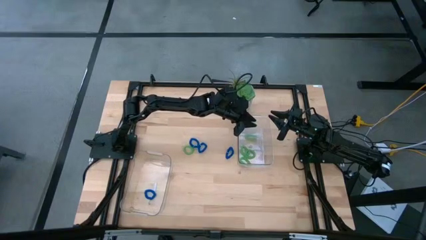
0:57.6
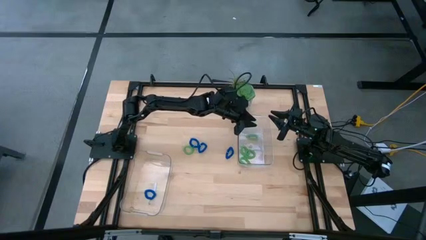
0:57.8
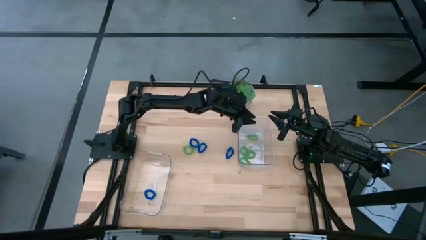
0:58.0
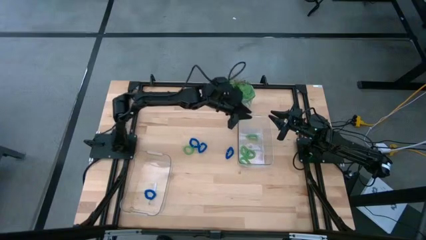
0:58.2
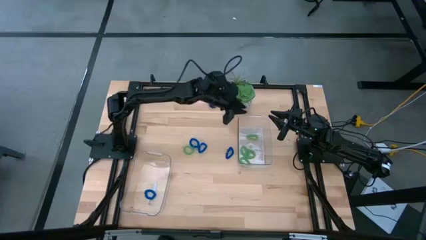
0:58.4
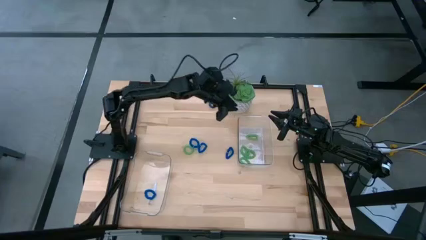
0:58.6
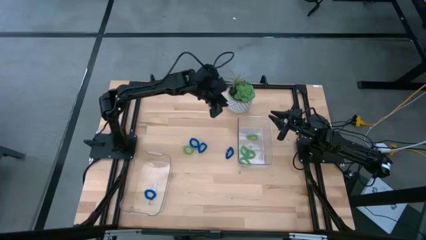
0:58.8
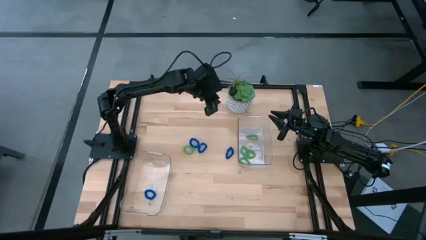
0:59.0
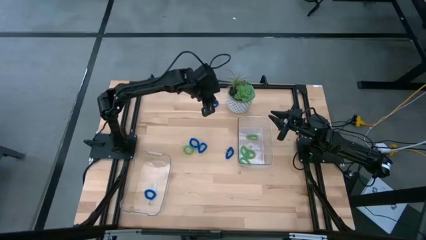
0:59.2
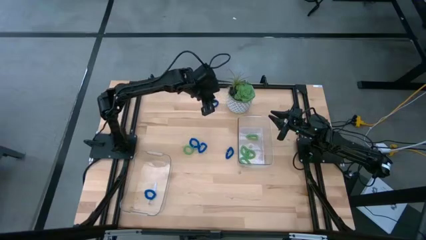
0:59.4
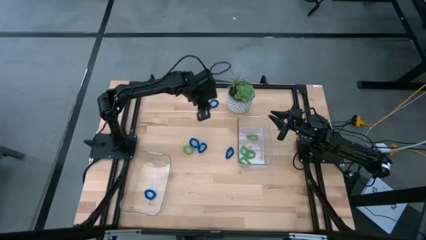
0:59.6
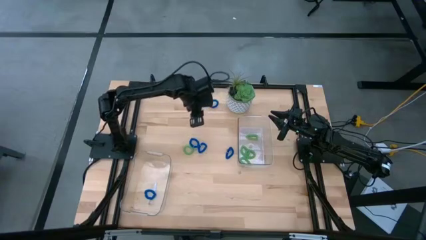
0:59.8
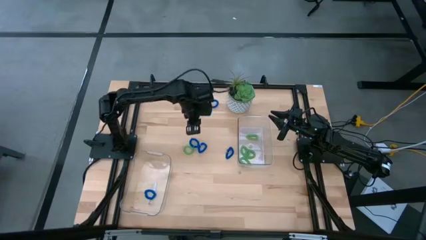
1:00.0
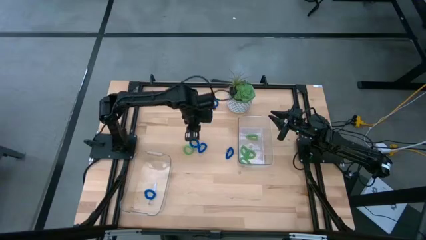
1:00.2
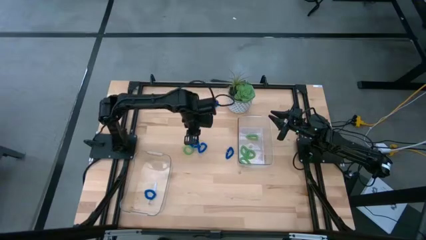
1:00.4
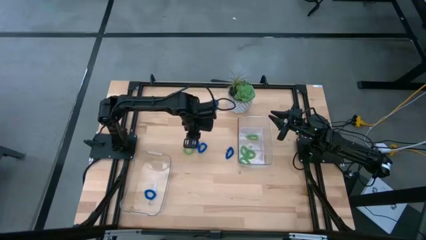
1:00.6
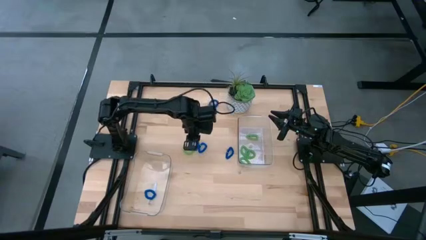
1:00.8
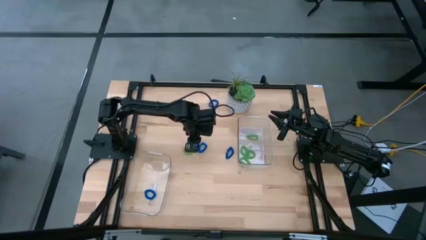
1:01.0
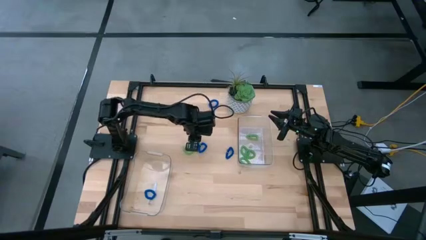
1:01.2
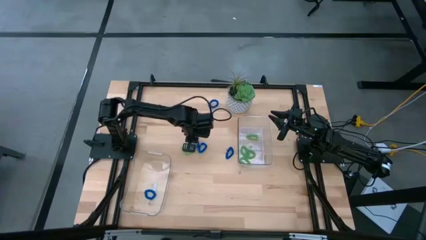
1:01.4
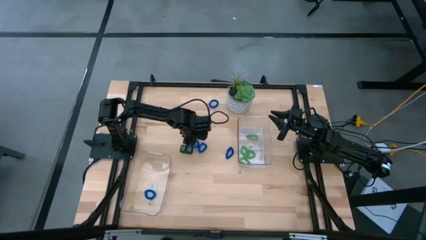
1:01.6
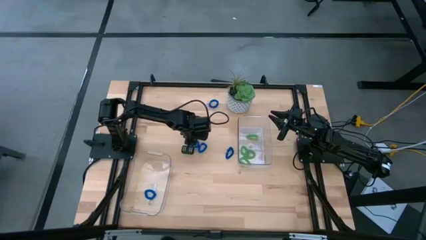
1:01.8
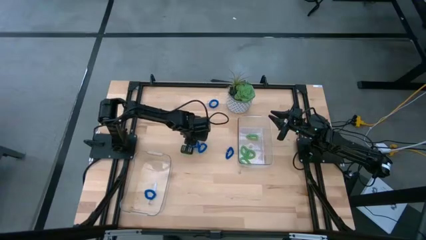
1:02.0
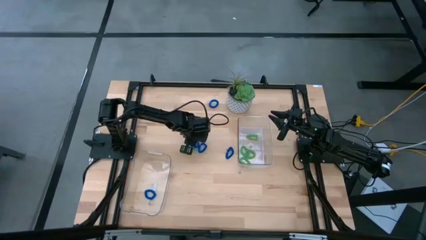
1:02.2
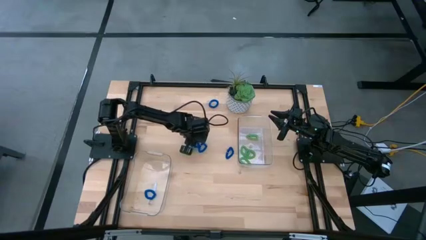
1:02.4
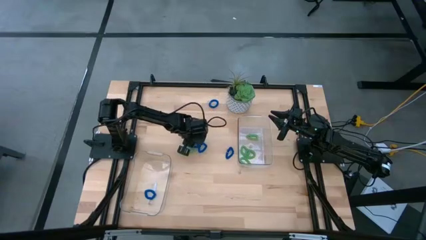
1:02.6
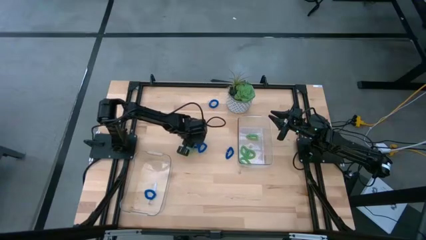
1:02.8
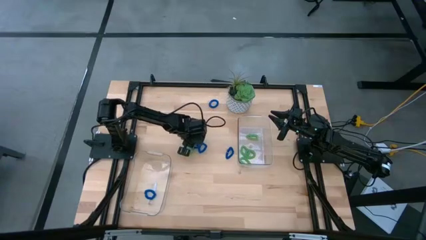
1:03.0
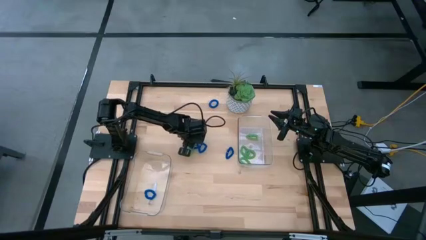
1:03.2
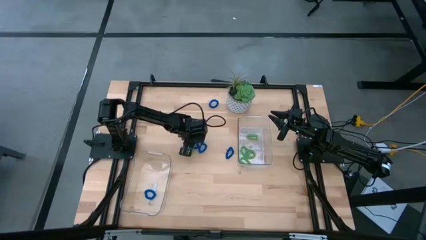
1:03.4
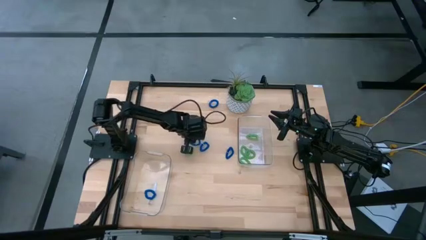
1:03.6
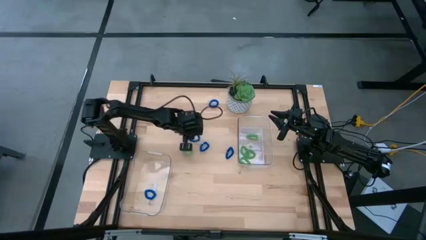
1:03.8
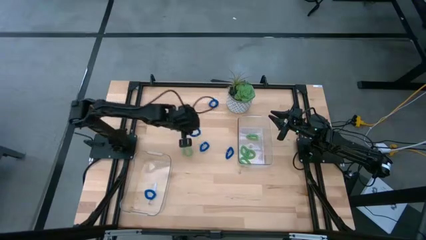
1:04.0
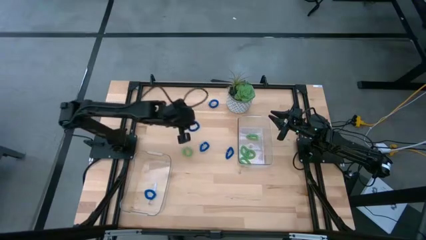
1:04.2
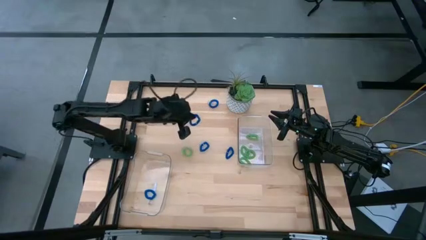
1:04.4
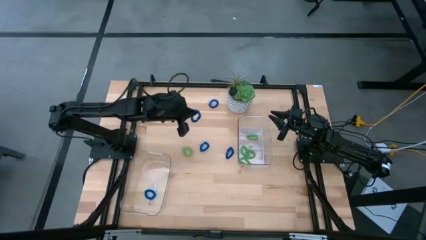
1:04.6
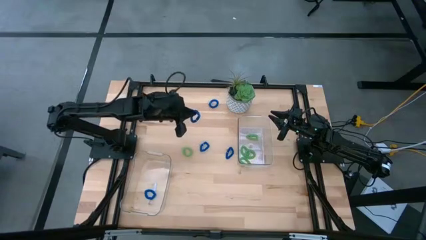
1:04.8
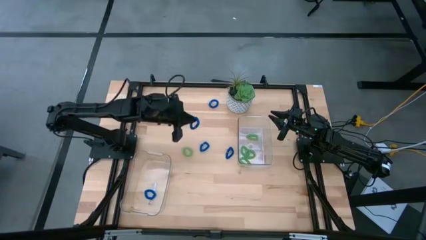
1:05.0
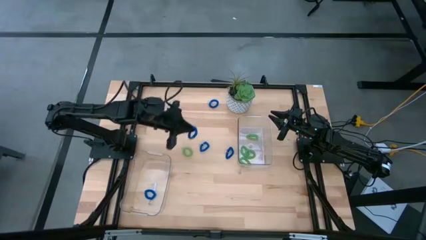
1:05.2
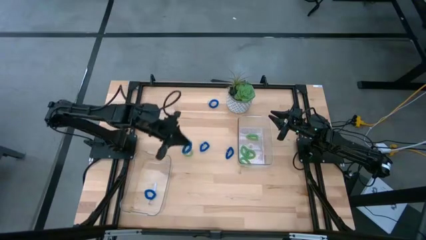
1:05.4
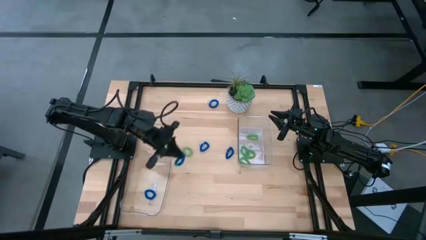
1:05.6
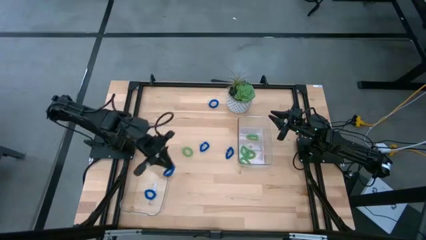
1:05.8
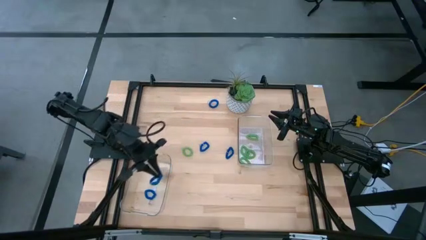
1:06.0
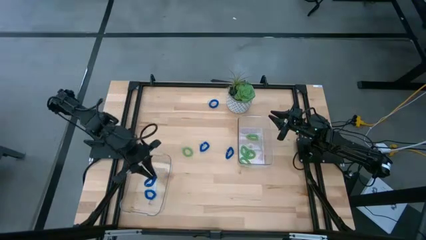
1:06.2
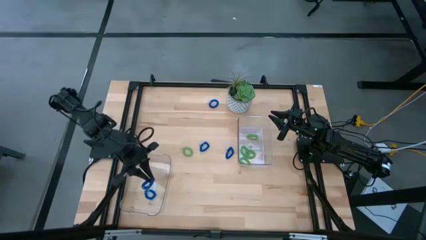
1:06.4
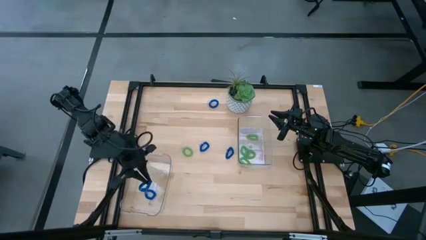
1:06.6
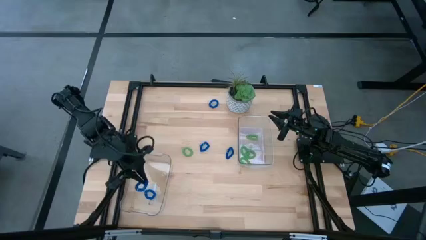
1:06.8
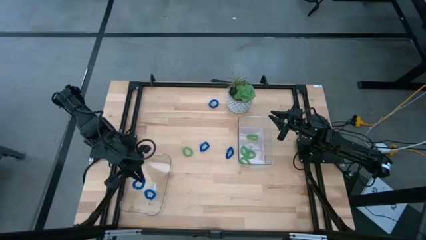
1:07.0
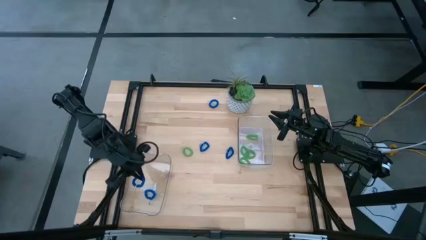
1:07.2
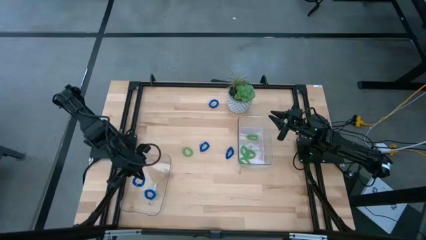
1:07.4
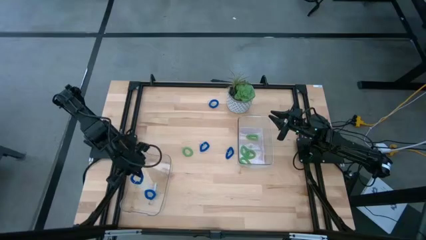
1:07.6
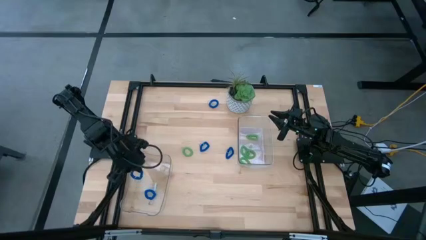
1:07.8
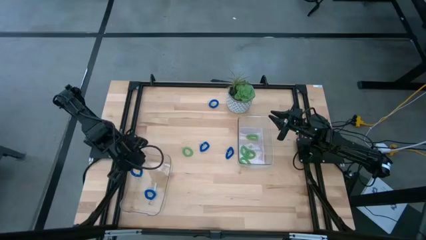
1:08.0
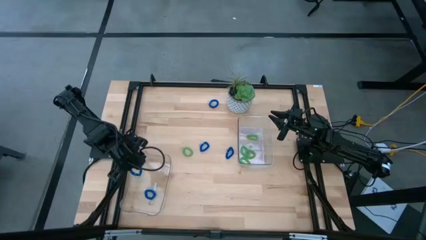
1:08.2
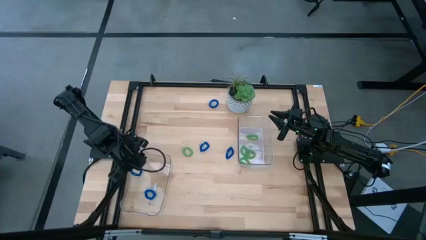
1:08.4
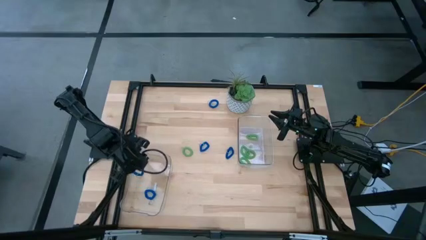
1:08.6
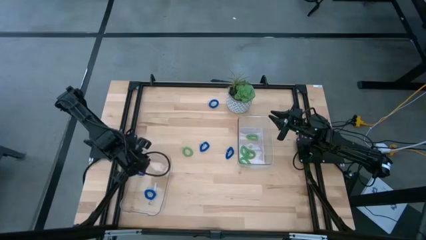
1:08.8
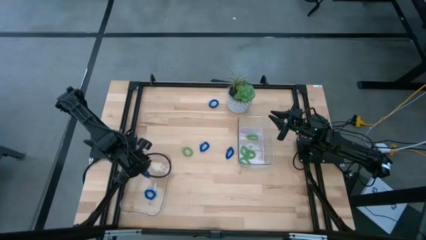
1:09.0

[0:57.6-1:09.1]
Task: Sort spring keychains
Put the blue spring keychain into the bottom transparent bin

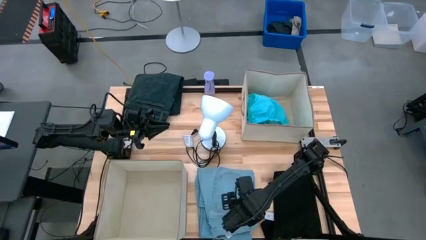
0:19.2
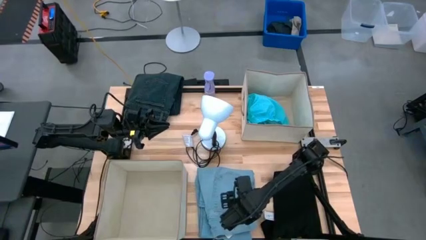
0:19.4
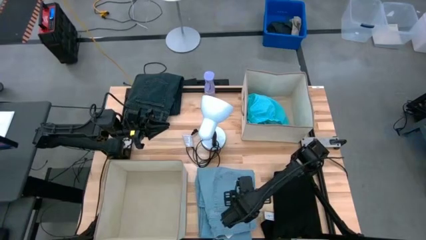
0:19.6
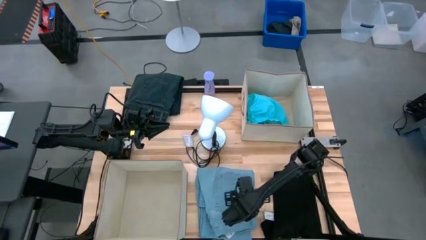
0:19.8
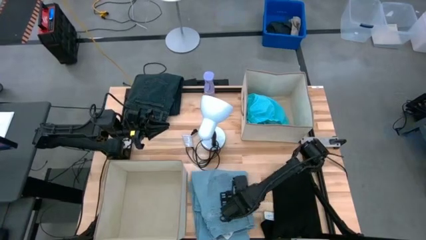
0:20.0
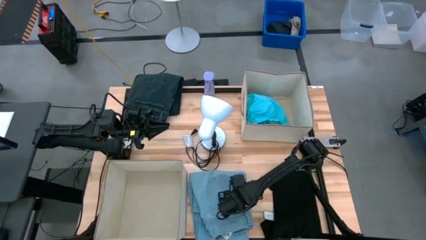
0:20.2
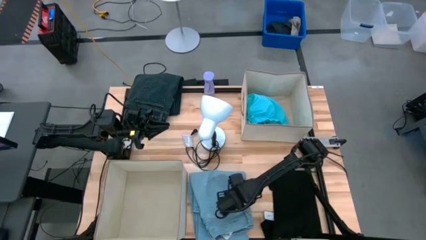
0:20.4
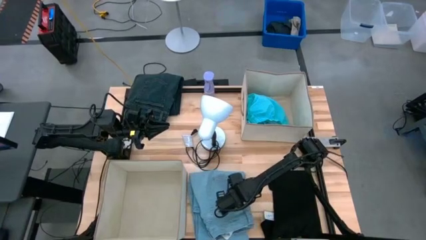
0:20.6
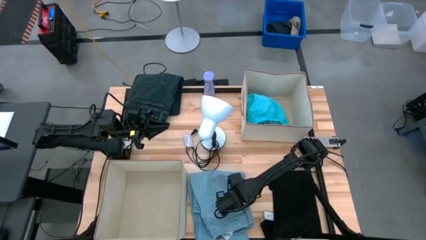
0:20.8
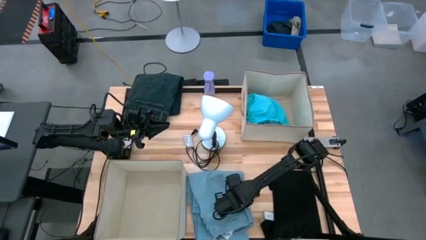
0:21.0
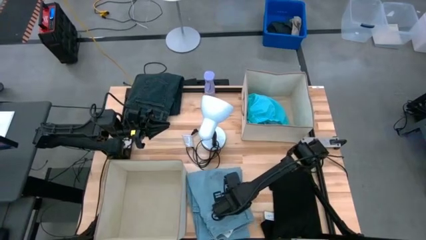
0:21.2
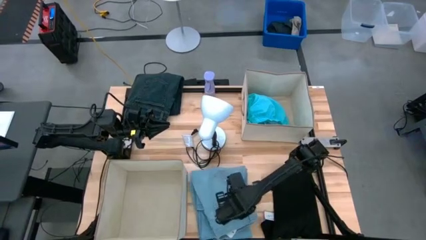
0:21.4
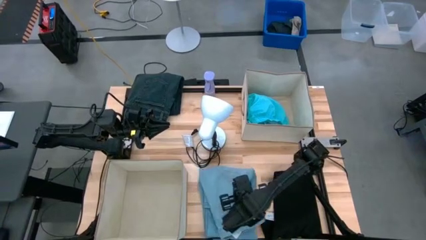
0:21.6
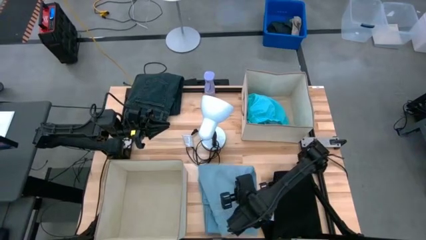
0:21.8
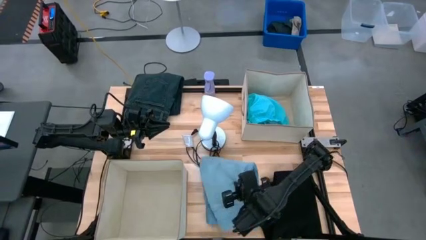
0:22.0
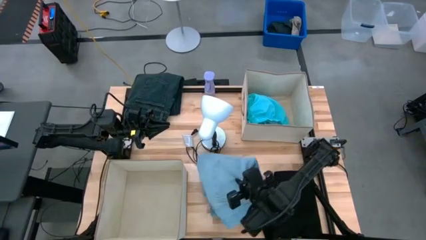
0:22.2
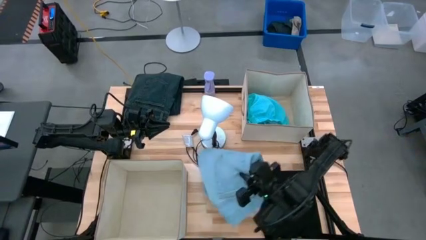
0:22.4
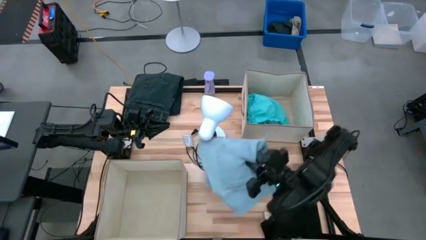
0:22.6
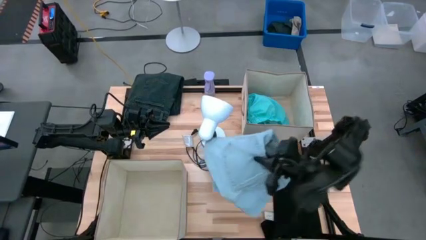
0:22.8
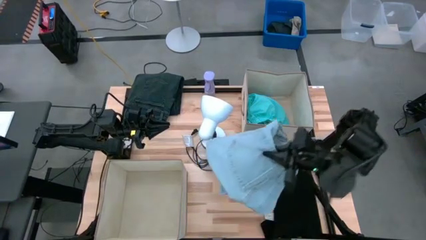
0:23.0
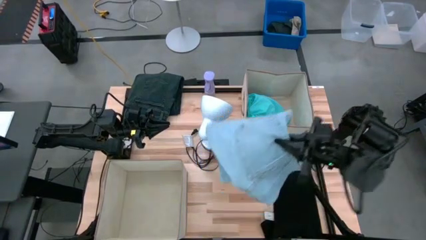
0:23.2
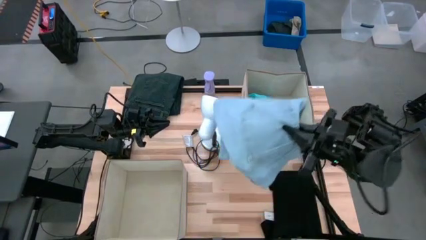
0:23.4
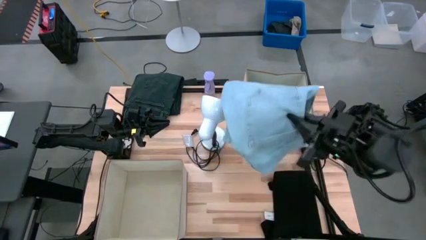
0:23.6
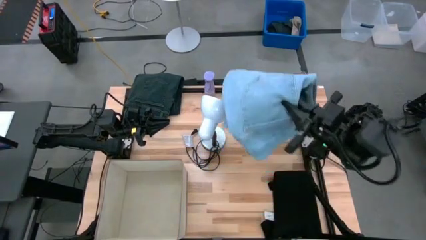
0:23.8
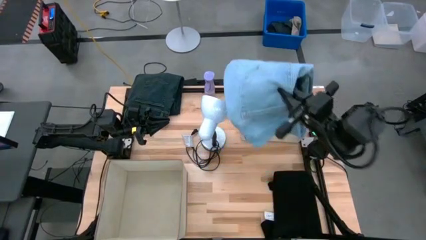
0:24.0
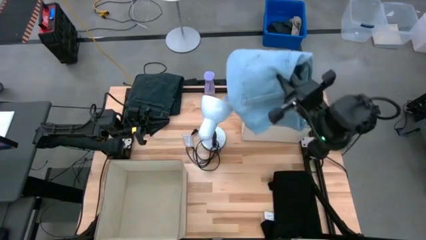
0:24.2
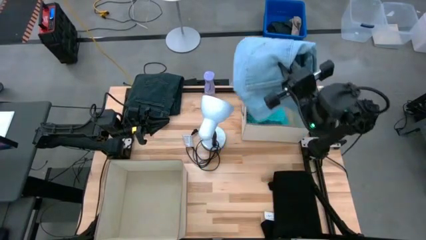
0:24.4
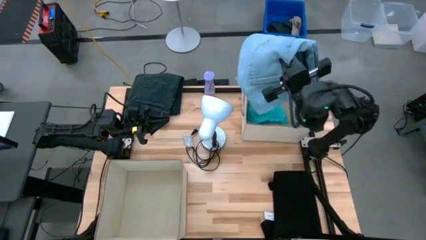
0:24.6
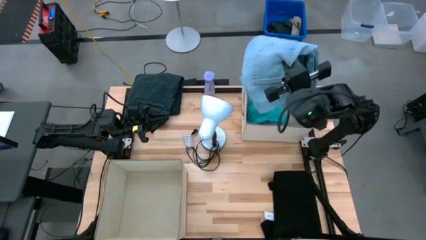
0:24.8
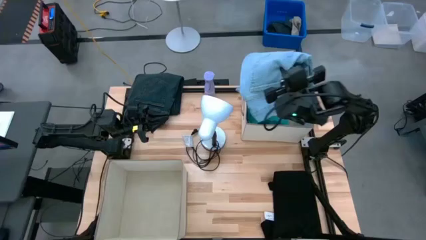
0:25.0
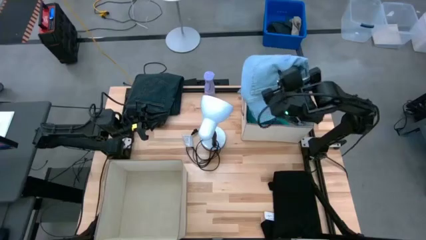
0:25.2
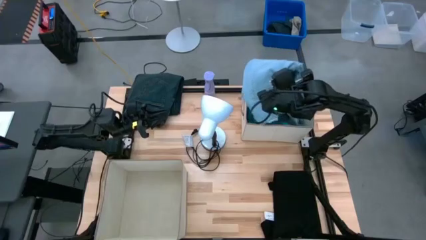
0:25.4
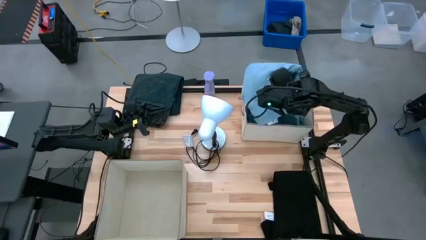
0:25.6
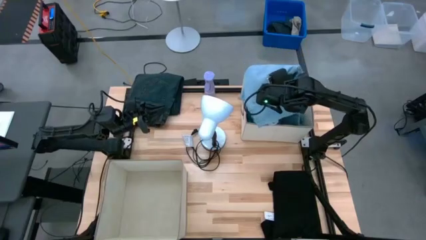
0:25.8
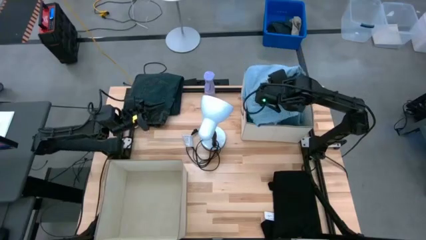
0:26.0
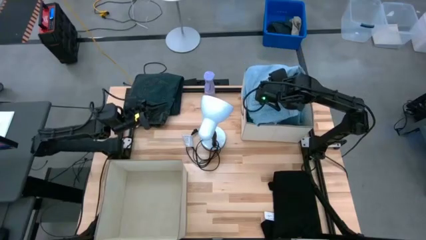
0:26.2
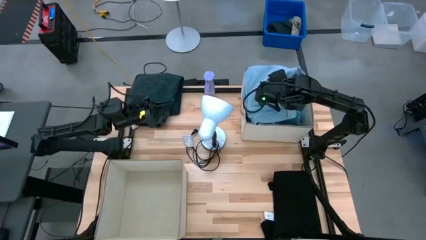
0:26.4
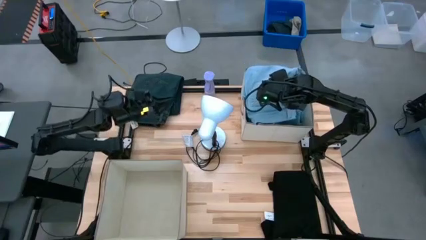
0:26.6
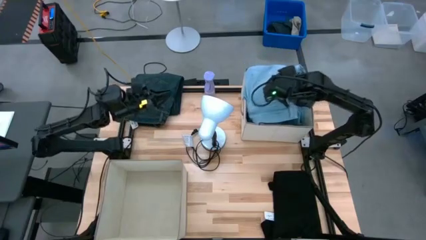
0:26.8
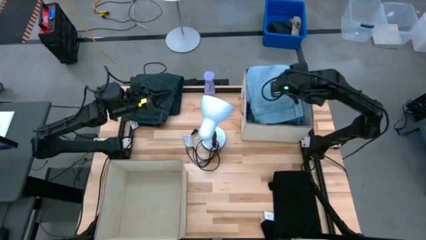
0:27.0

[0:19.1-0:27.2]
Task: Sort clothes
Put the light blue pants into the top laundry organizer
